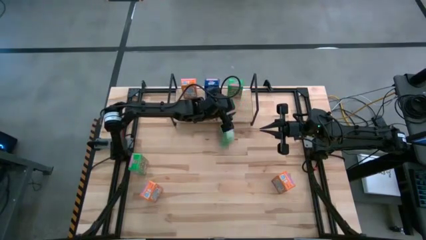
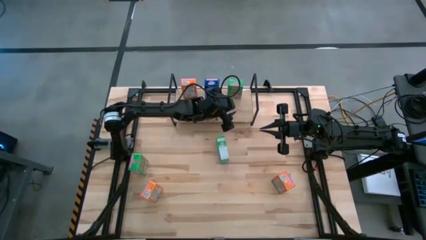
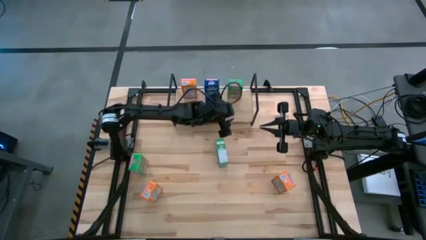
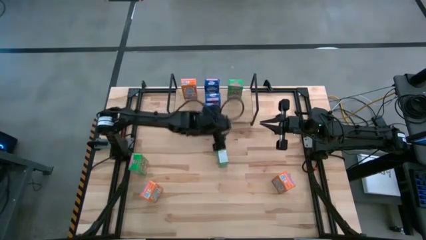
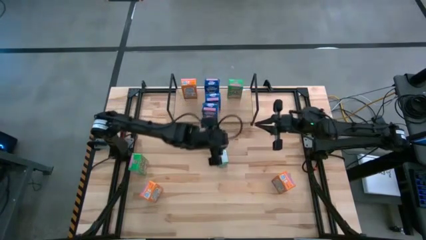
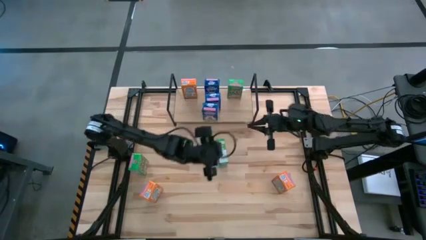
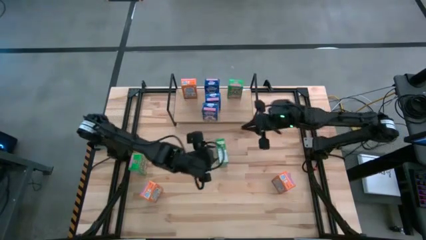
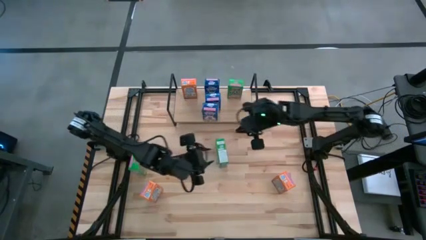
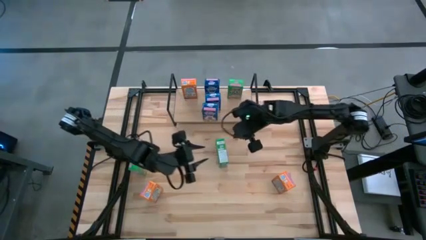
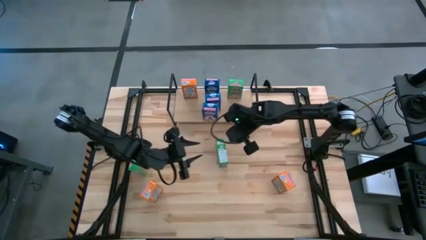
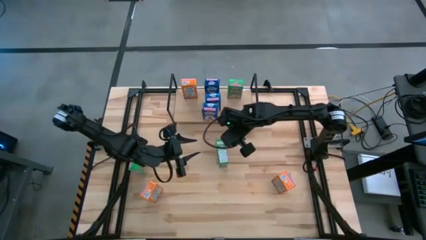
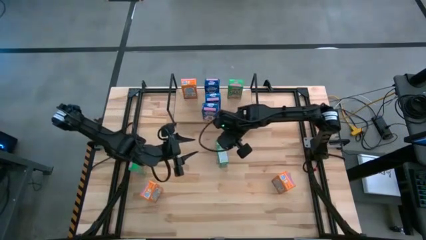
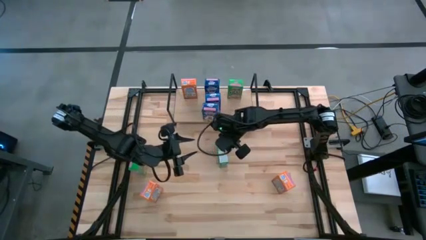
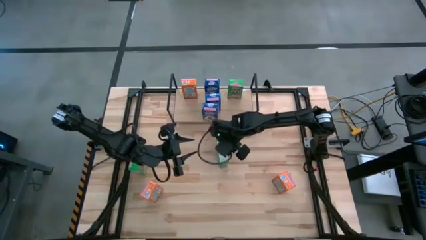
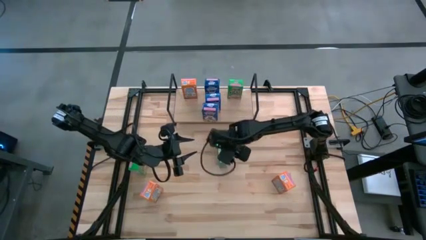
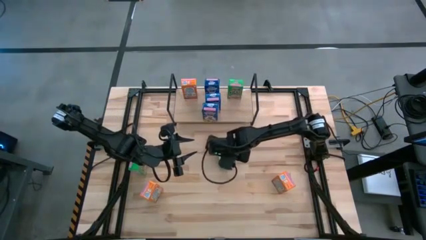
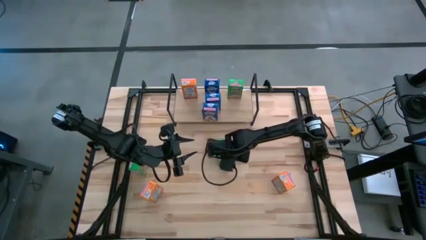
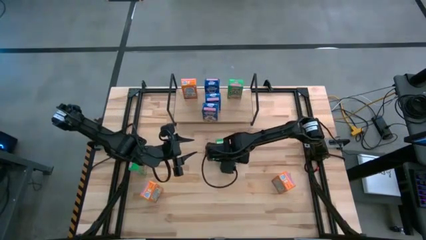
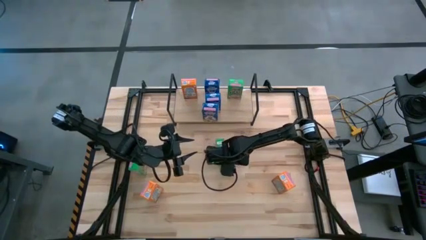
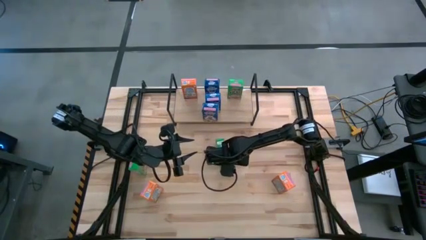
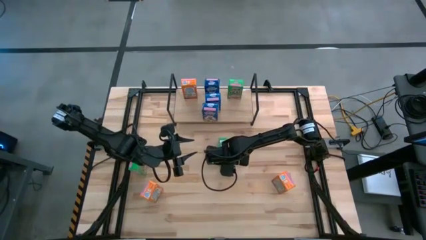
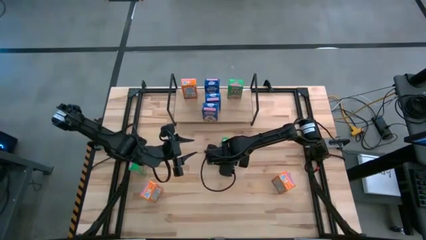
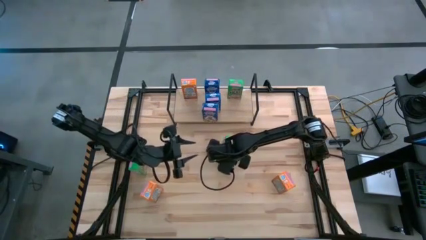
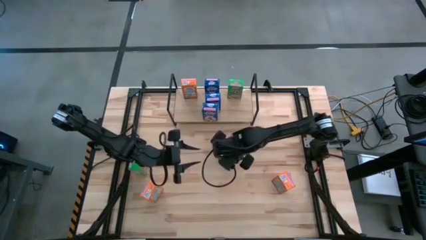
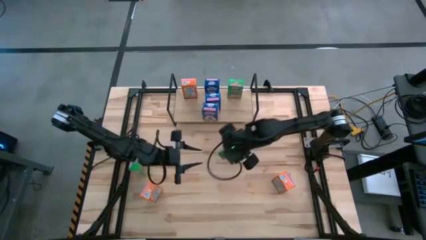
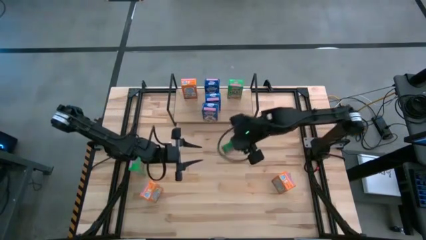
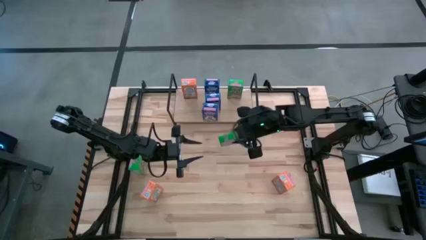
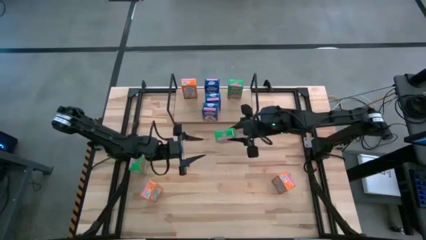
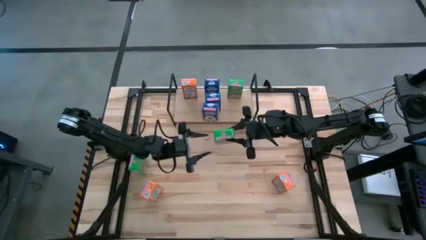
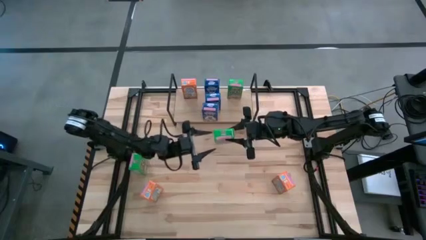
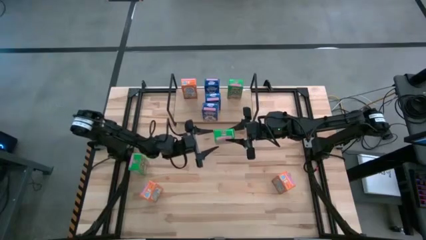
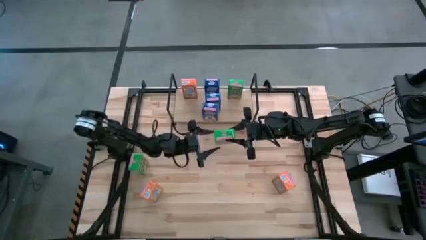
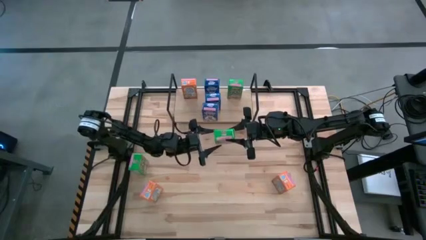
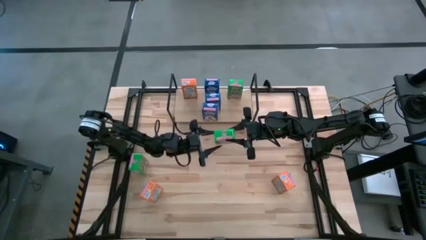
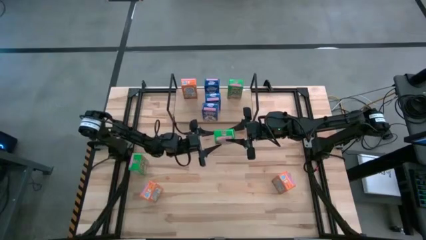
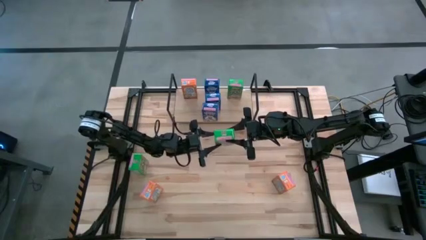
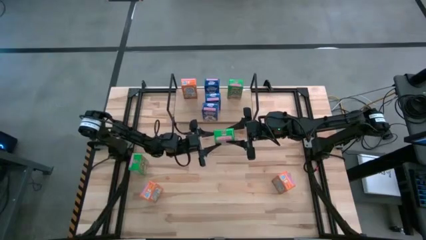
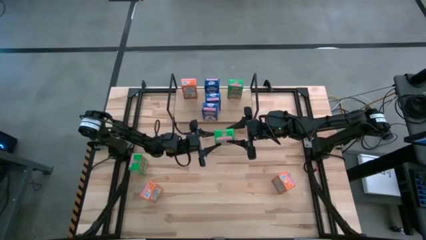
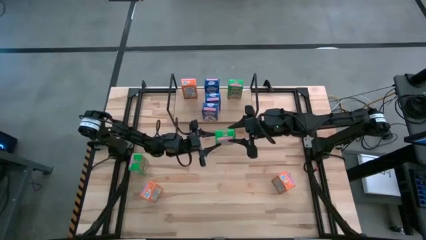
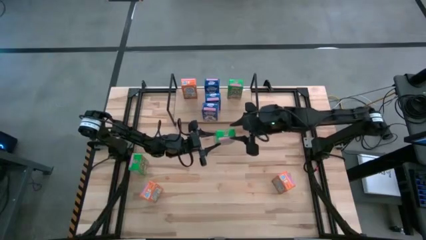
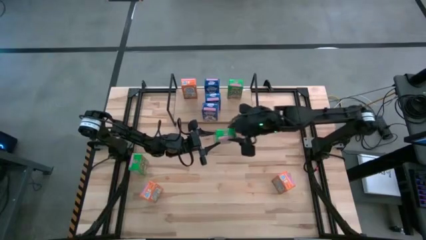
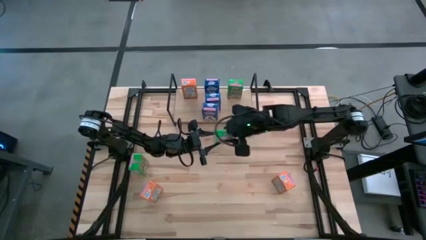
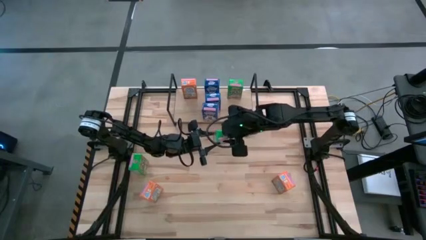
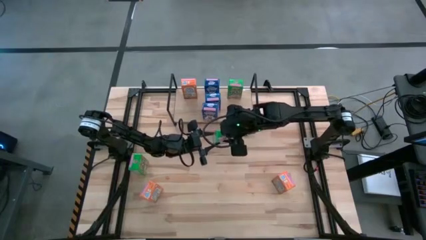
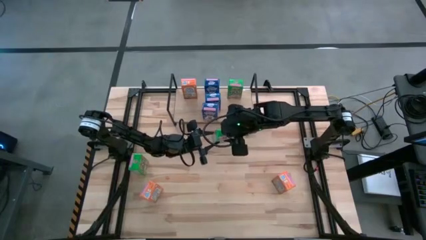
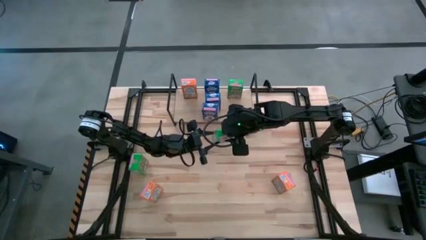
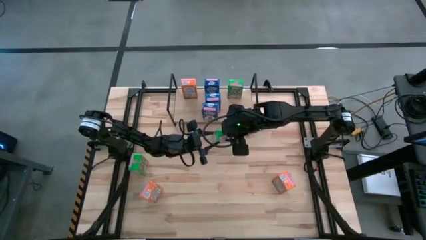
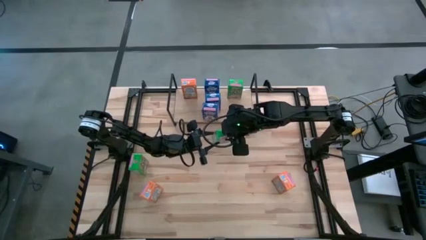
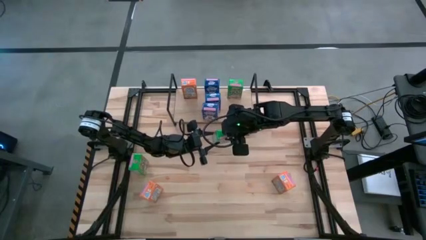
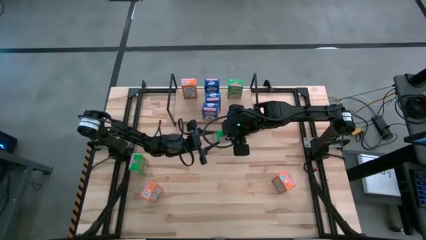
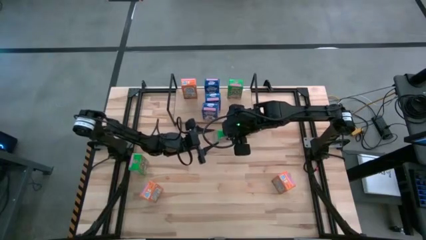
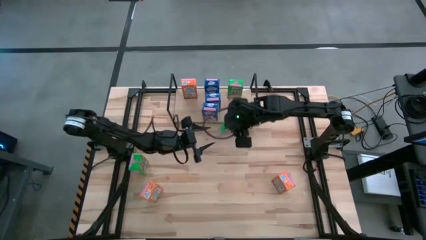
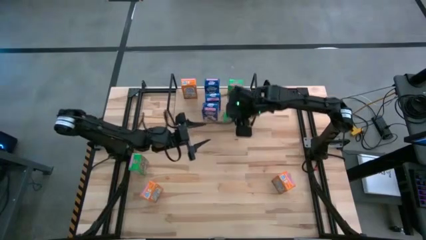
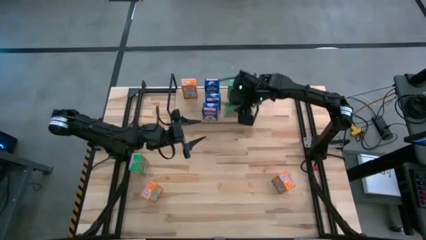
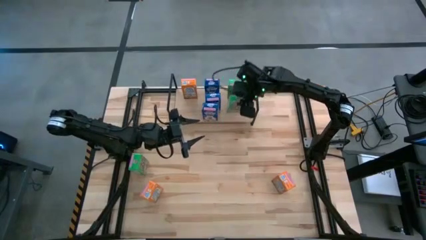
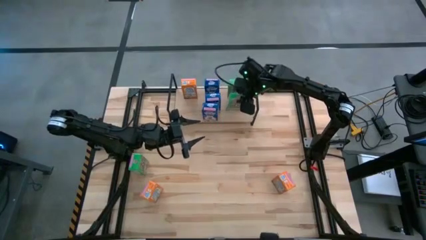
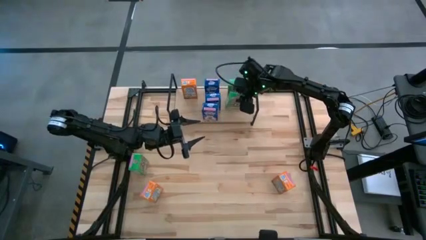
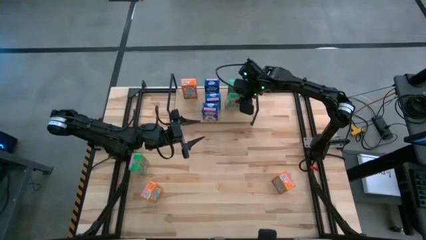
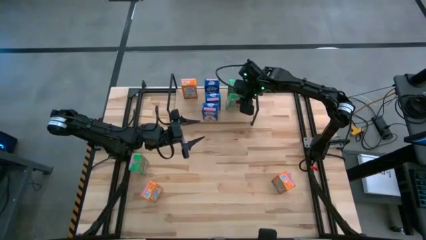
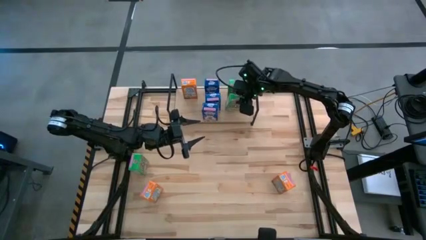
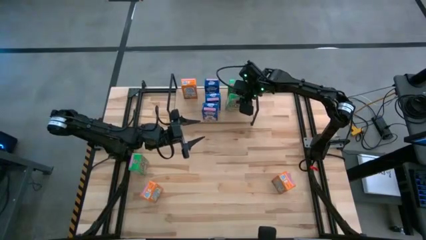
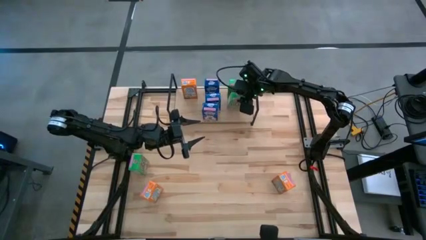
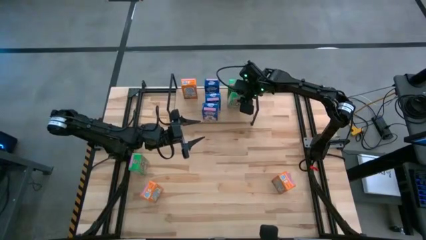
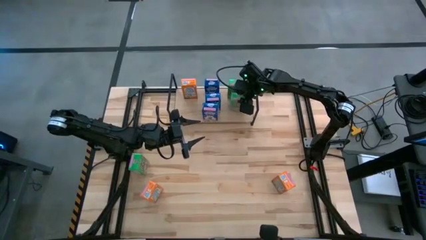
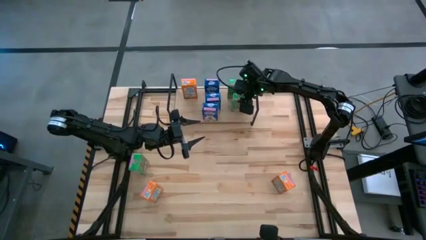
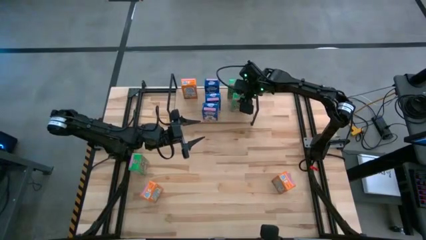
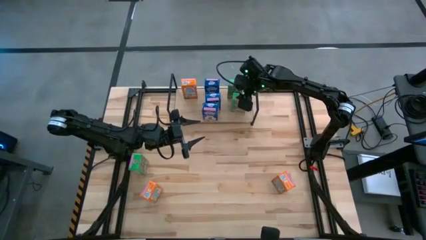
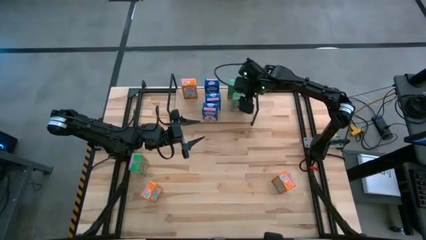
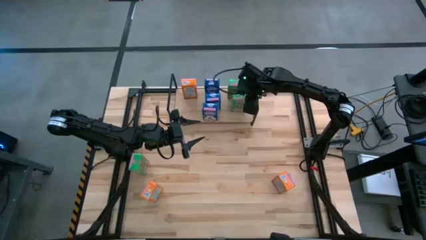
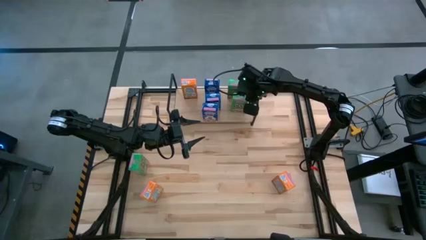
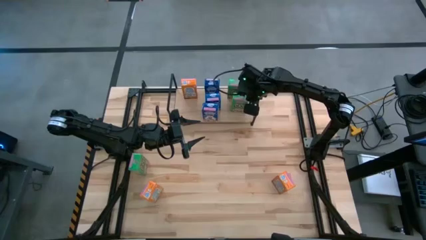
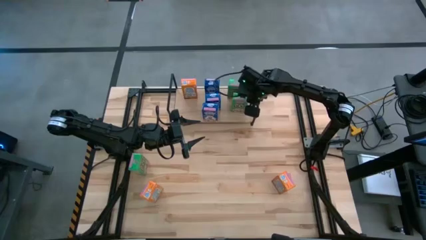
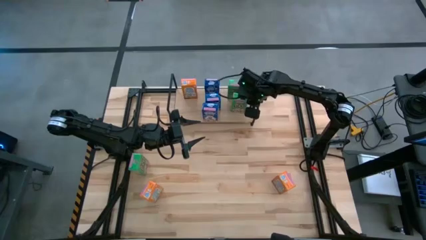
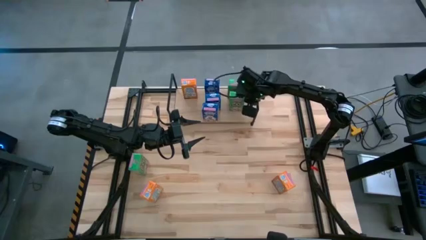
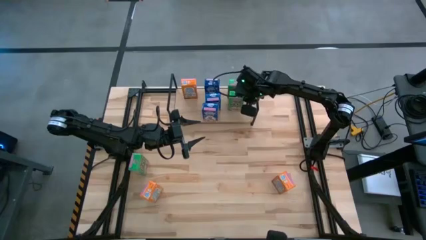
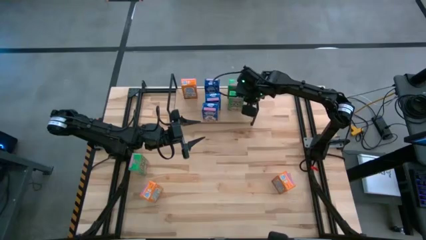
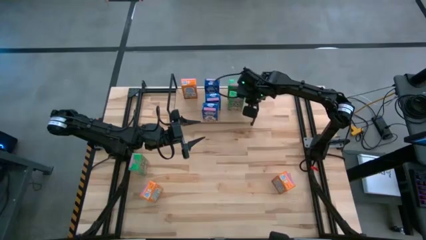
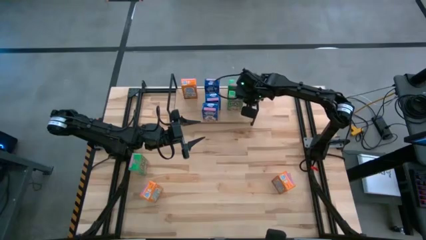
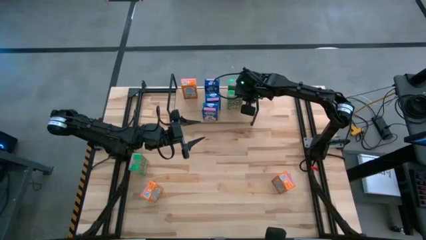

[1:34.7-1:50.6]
Task: Stack cereal on shelf
Put the right green cereal box on the shelf
